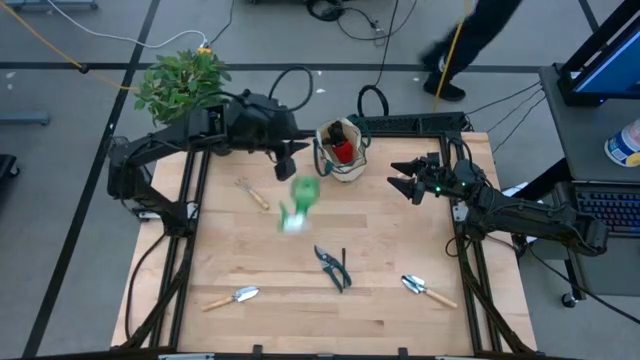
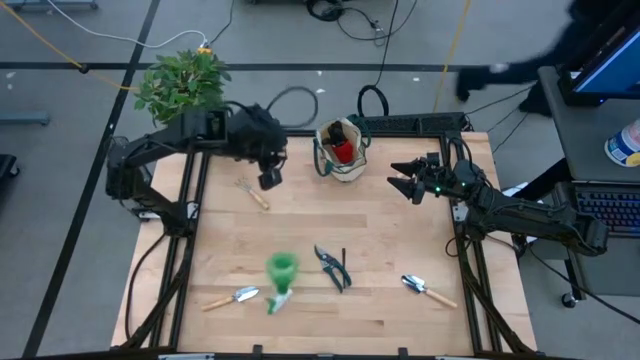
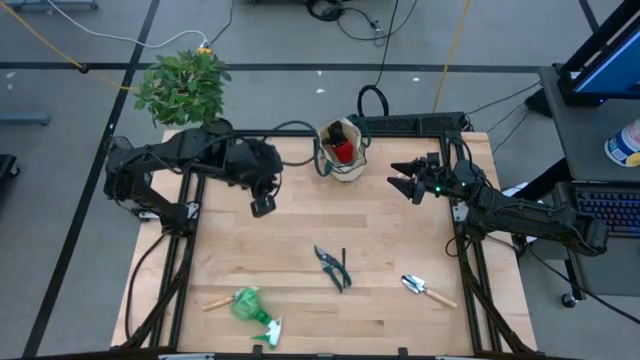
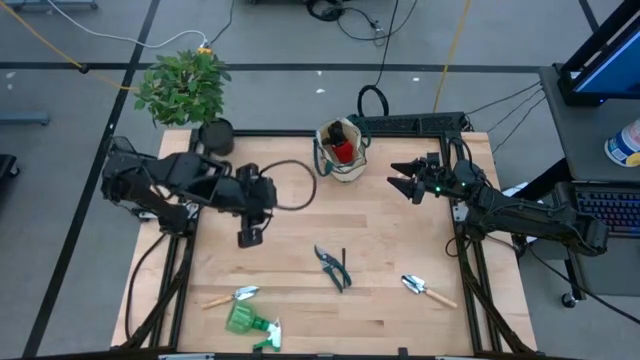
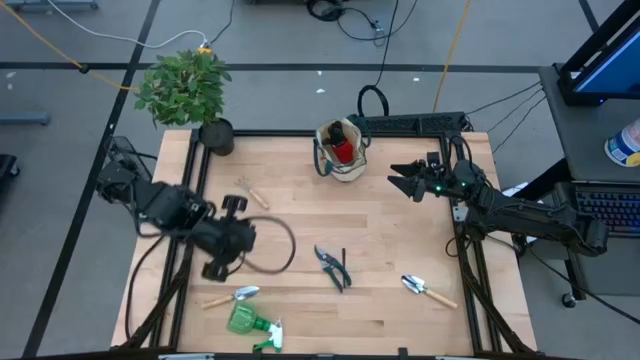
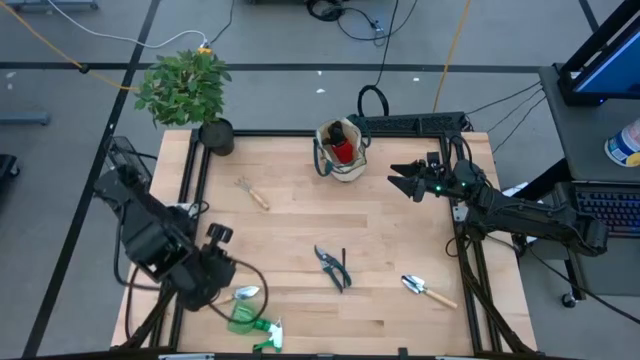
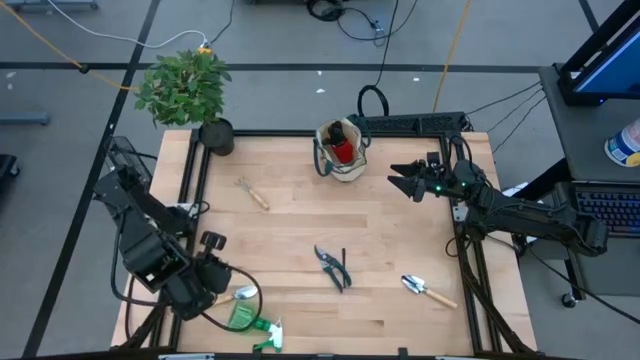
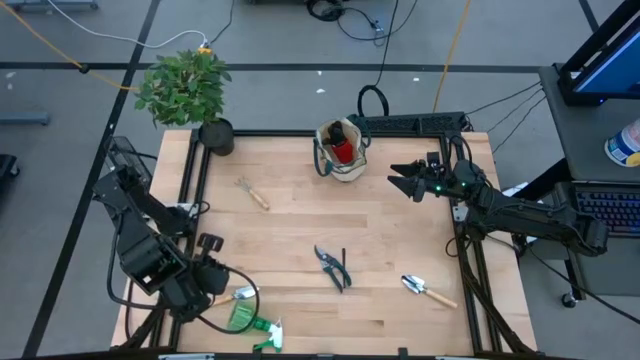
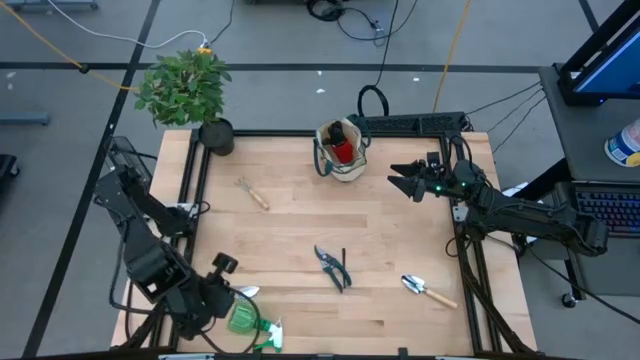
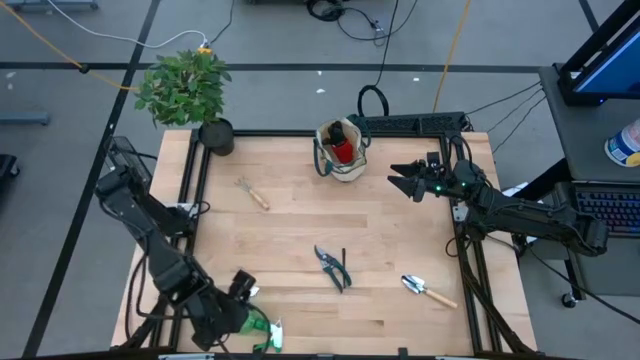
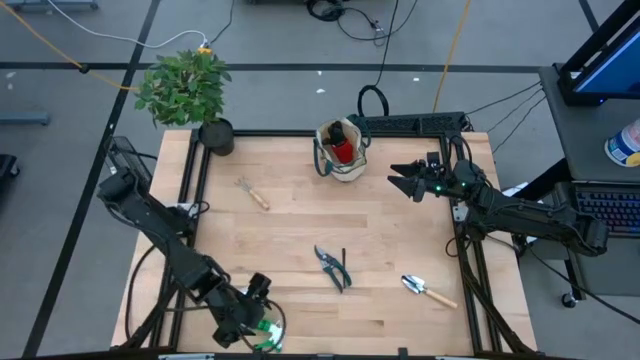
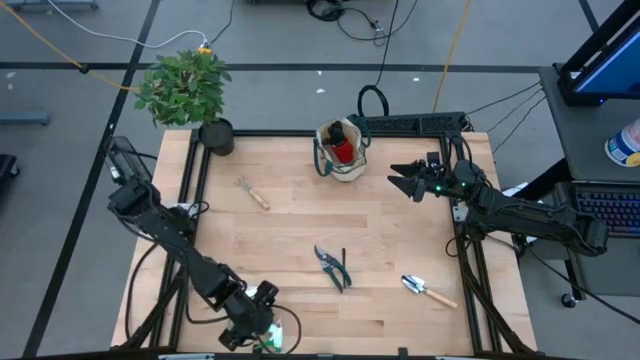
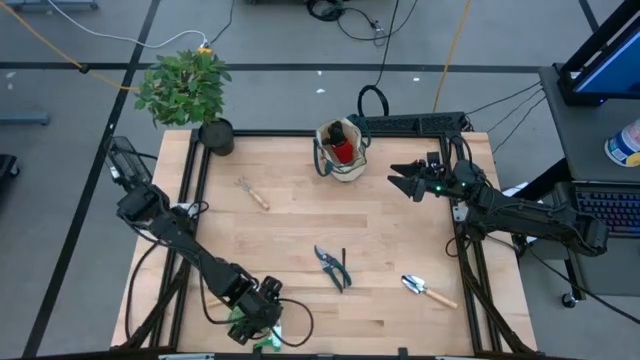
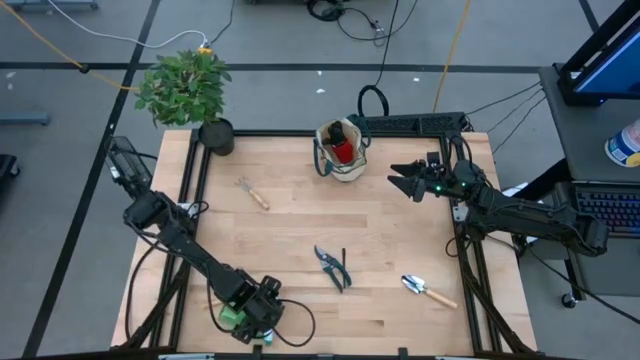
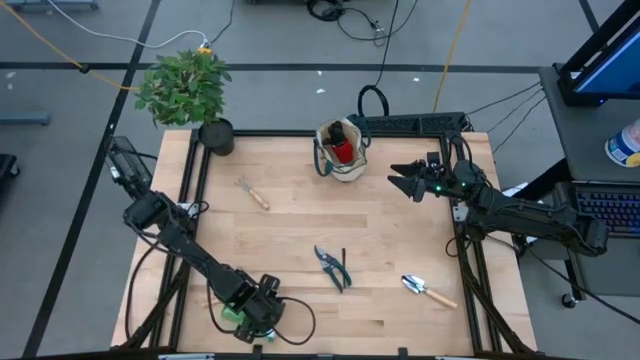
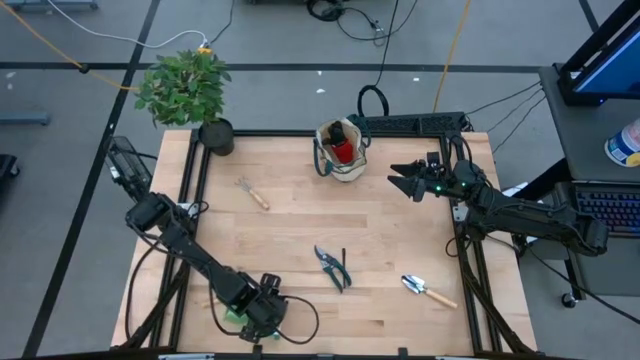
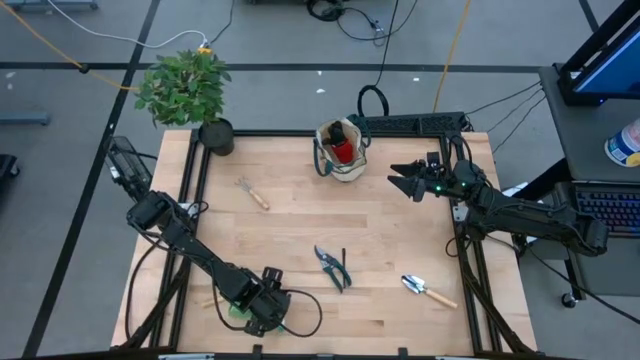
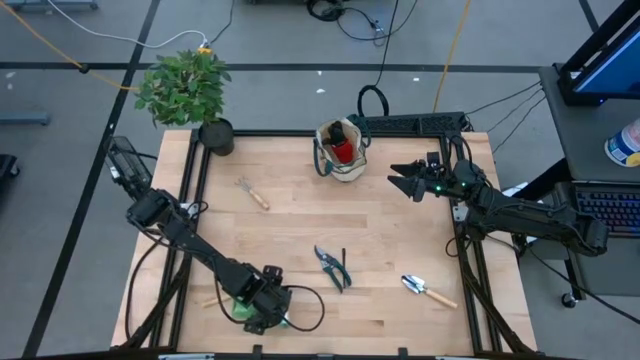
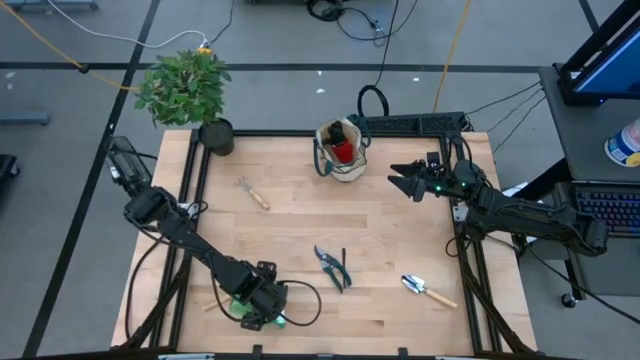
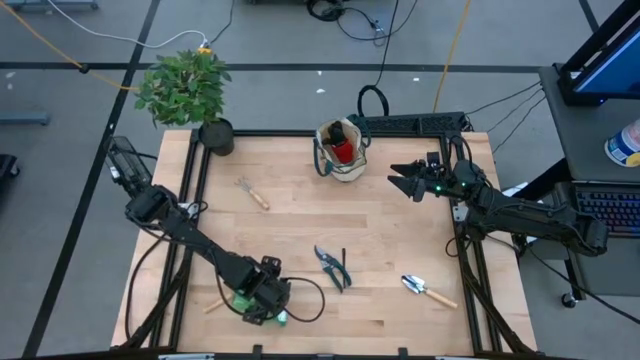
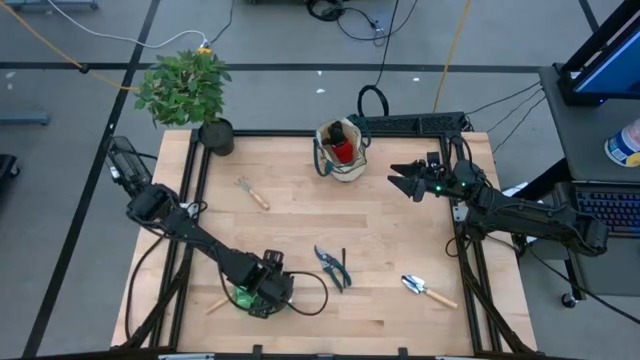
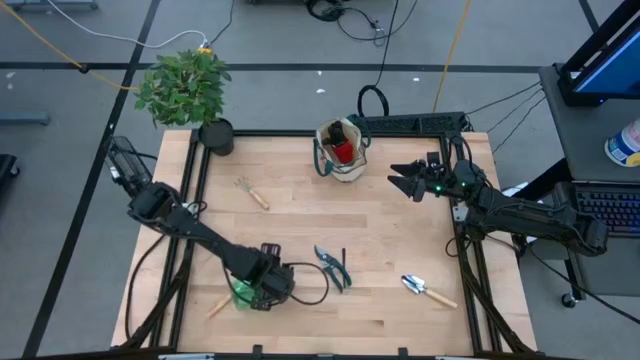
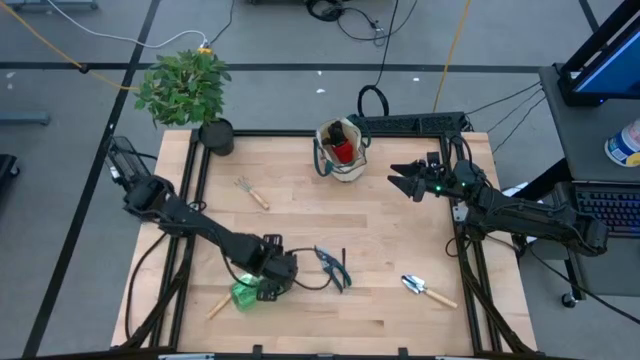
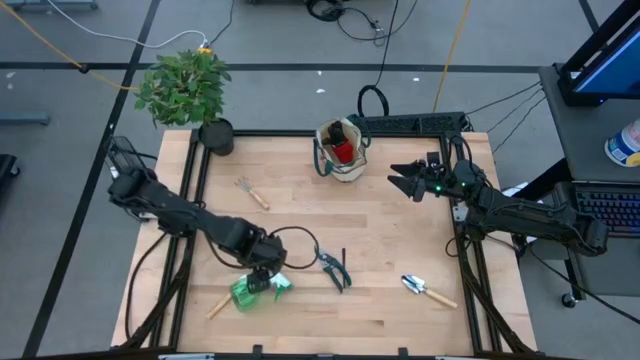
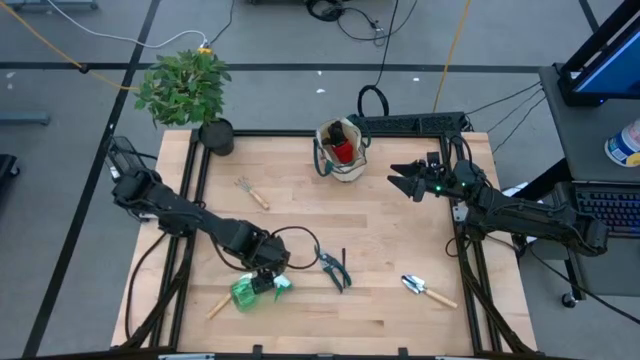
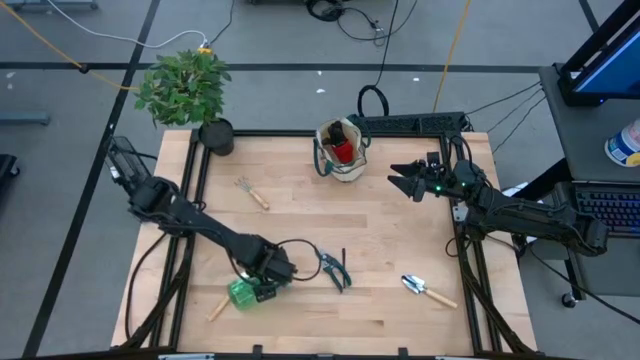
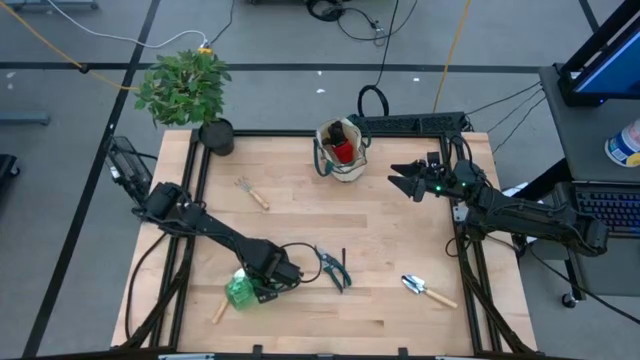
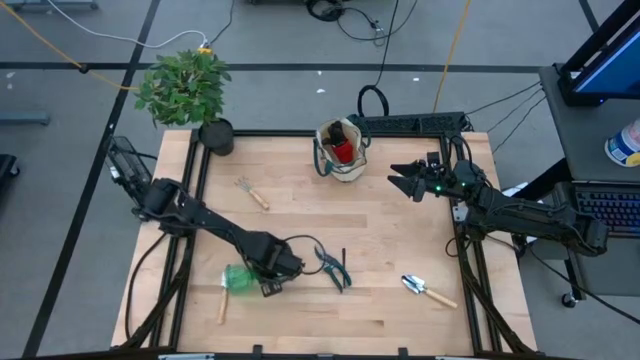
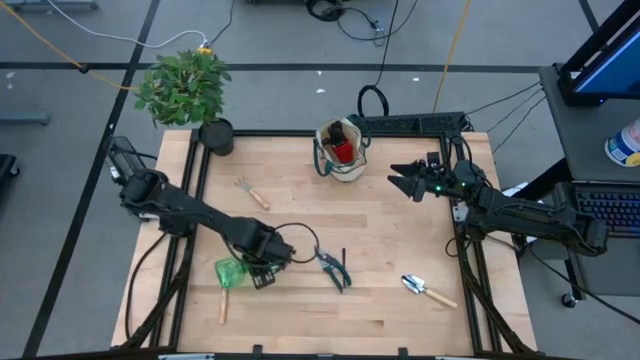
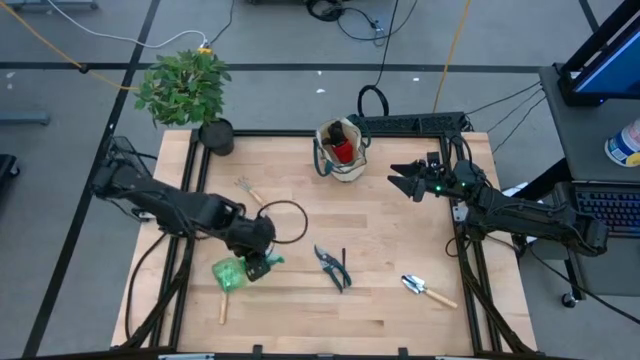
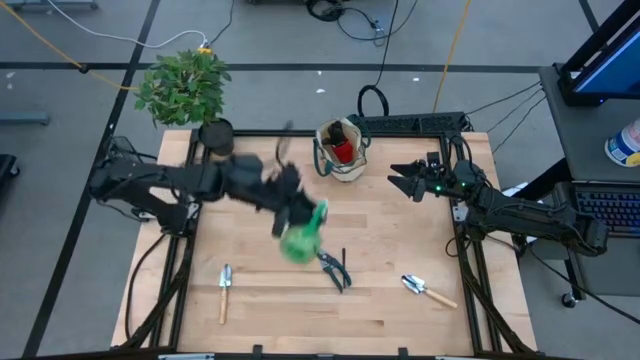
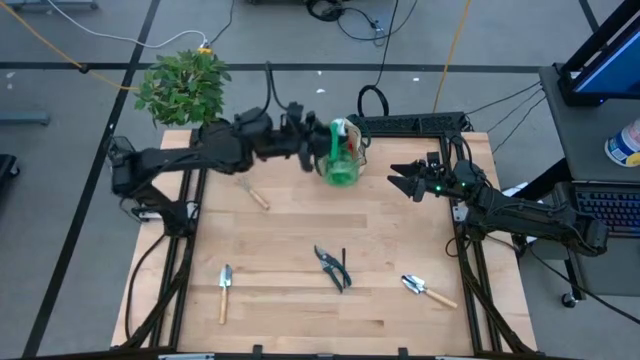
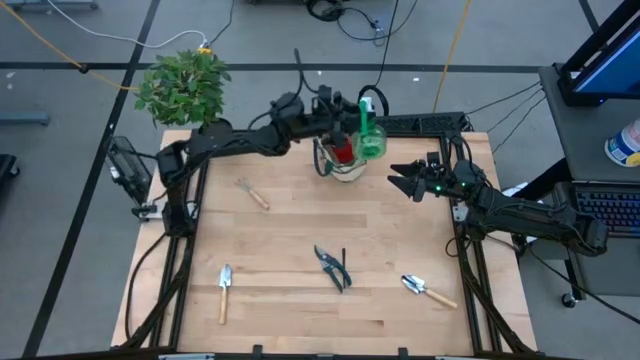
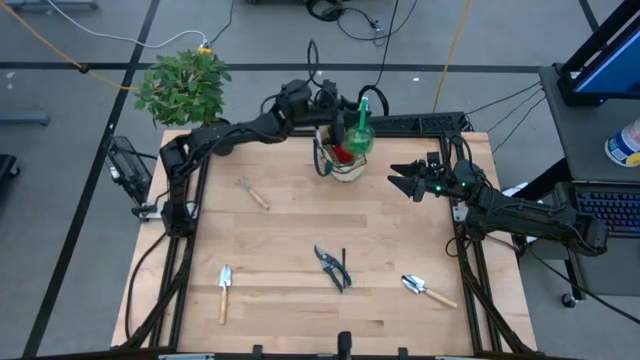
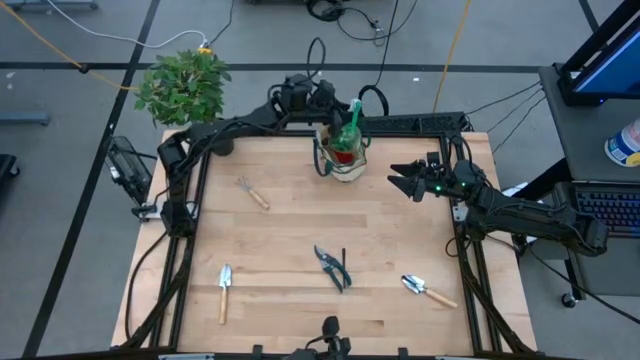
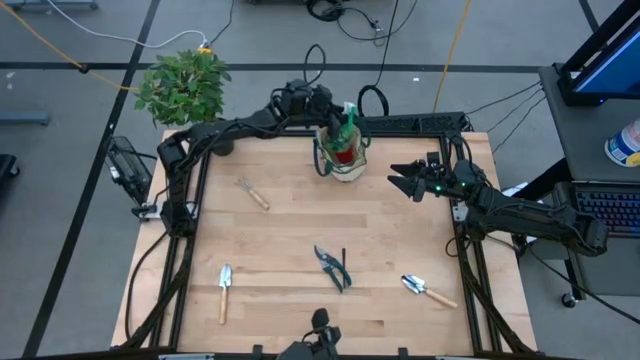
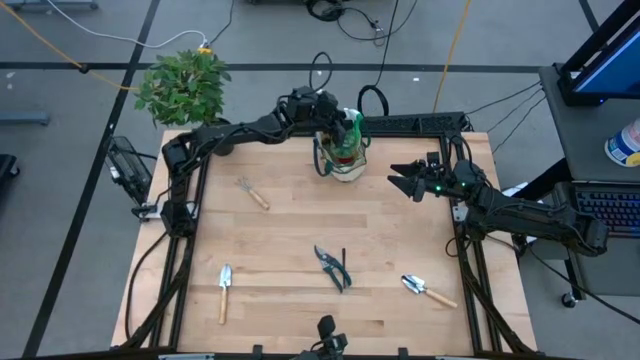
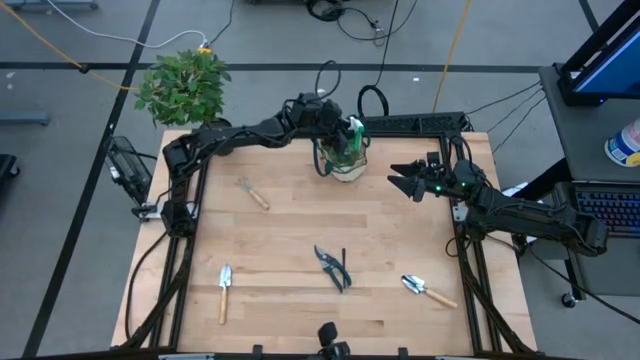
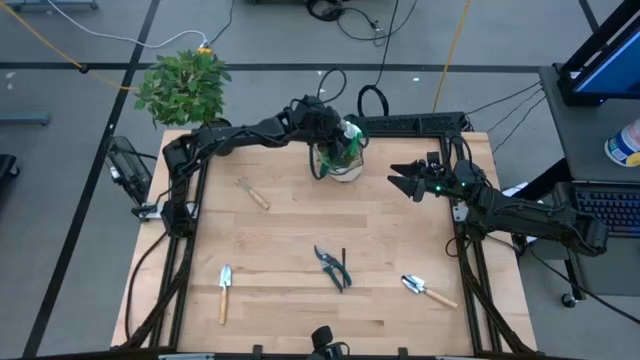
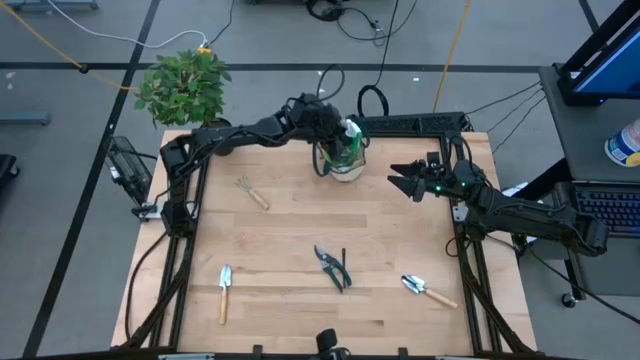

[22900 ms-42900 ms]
Task: Pick & Place Garden tools in Gardening bag
Put the spray bottle into the gardening bag
